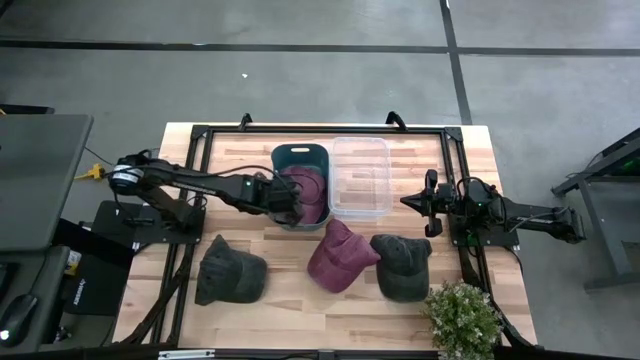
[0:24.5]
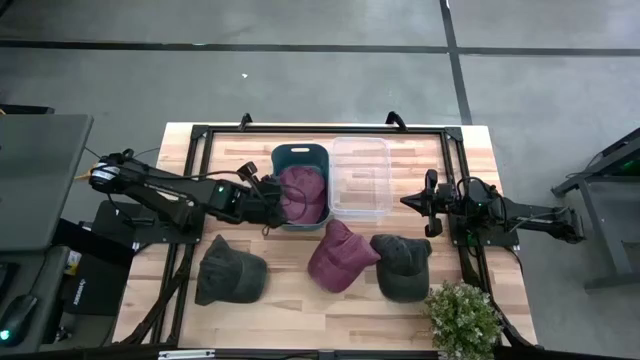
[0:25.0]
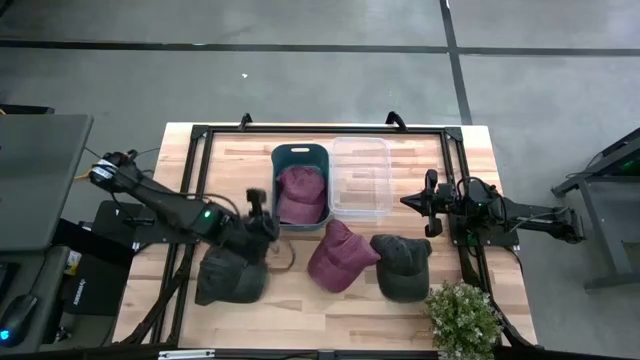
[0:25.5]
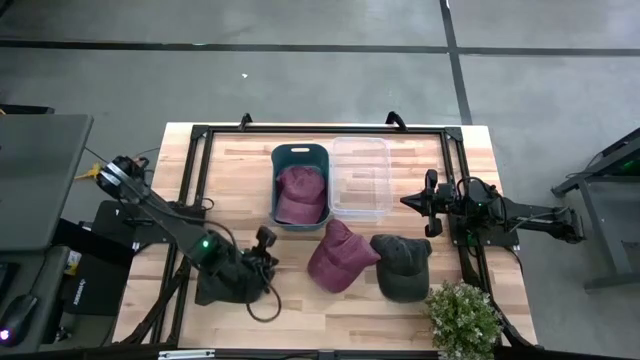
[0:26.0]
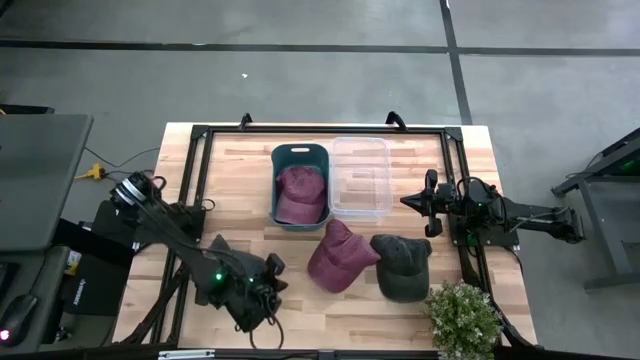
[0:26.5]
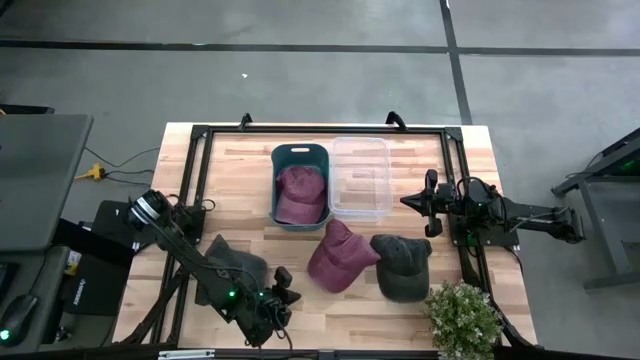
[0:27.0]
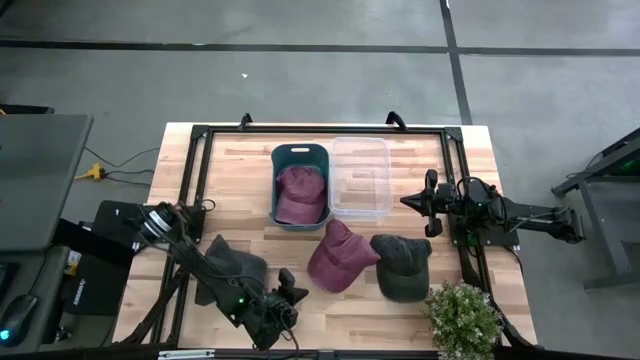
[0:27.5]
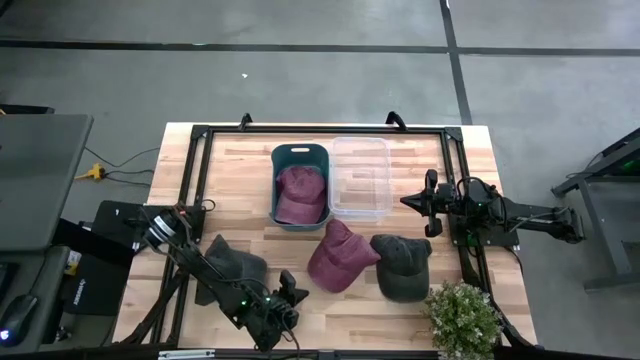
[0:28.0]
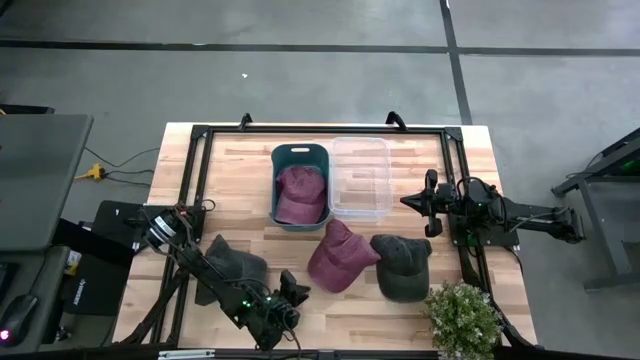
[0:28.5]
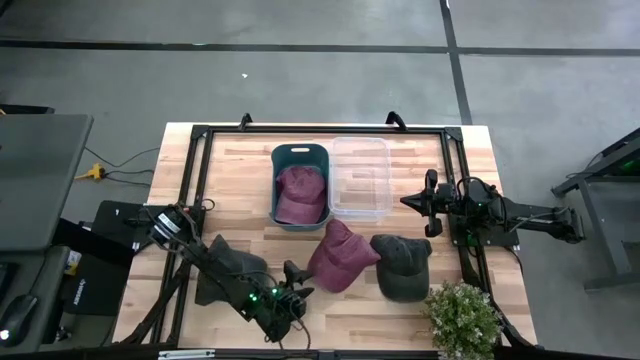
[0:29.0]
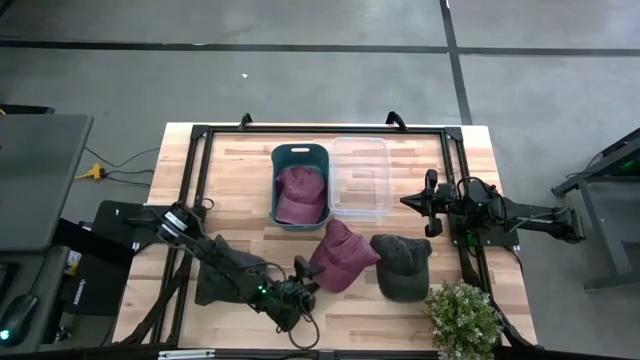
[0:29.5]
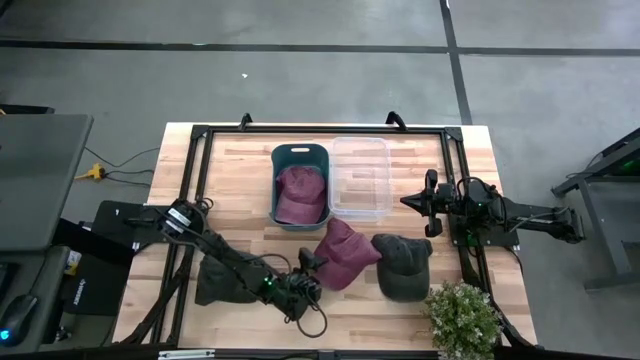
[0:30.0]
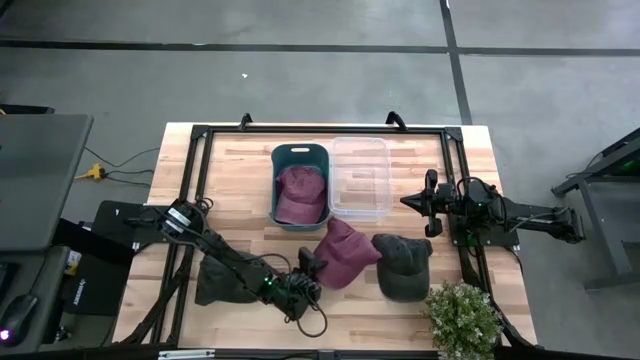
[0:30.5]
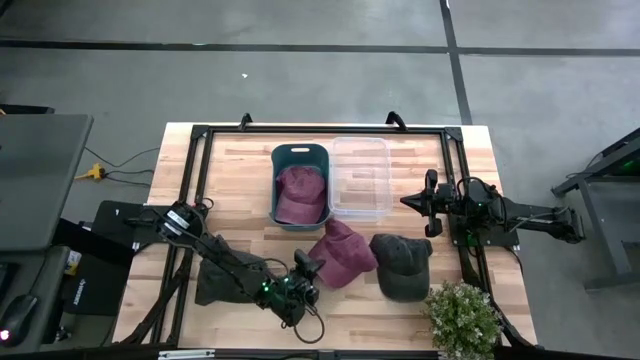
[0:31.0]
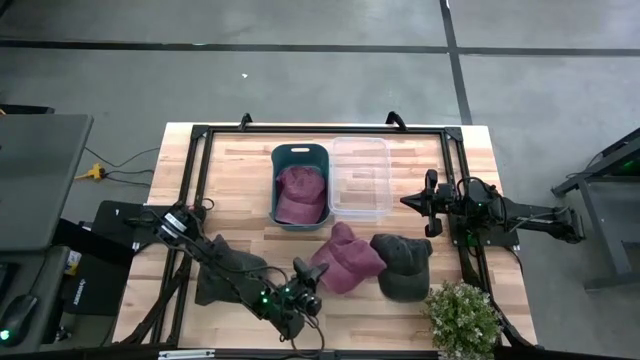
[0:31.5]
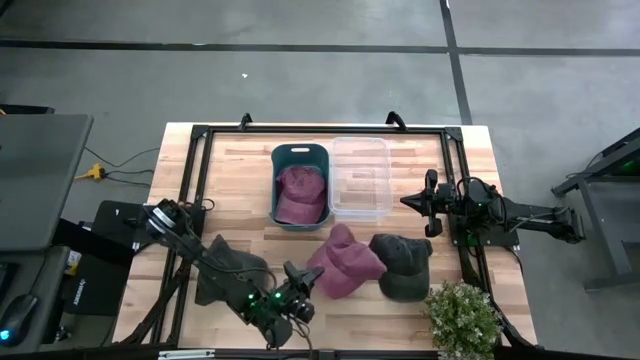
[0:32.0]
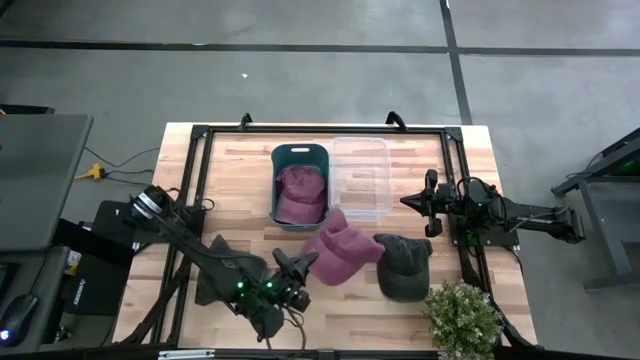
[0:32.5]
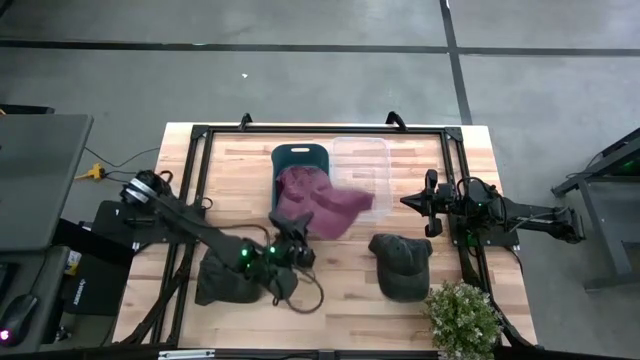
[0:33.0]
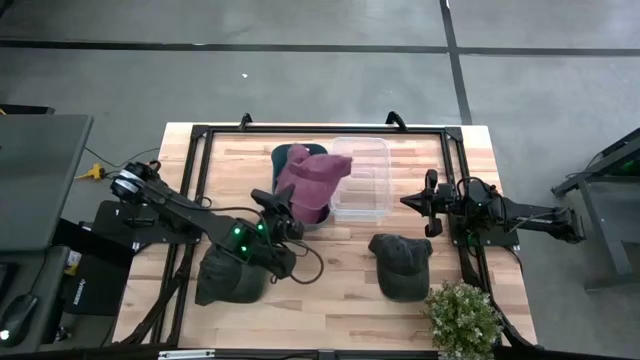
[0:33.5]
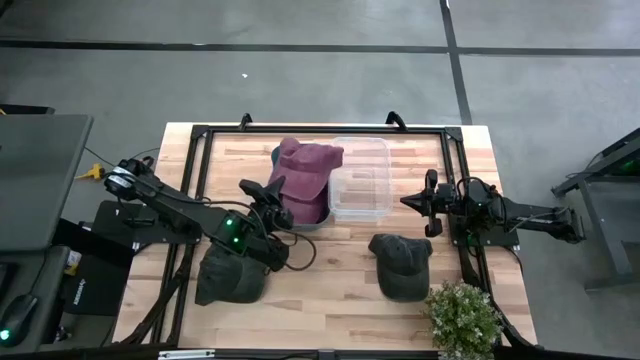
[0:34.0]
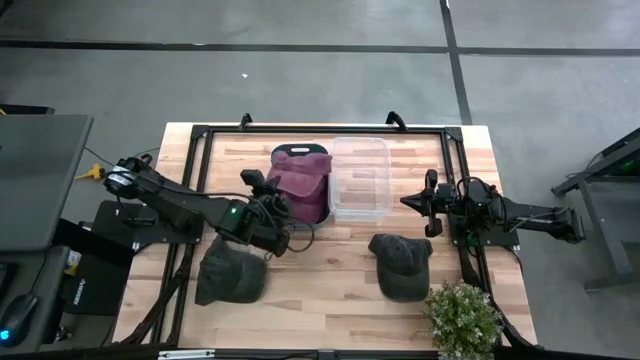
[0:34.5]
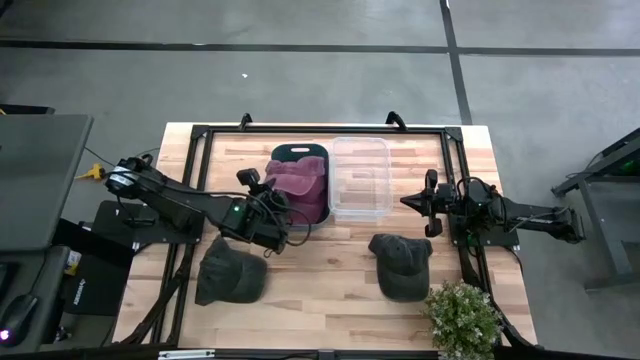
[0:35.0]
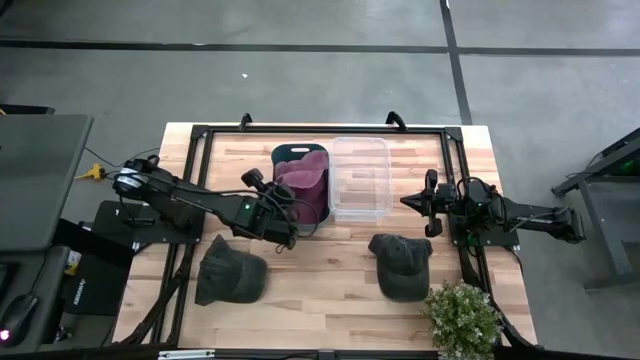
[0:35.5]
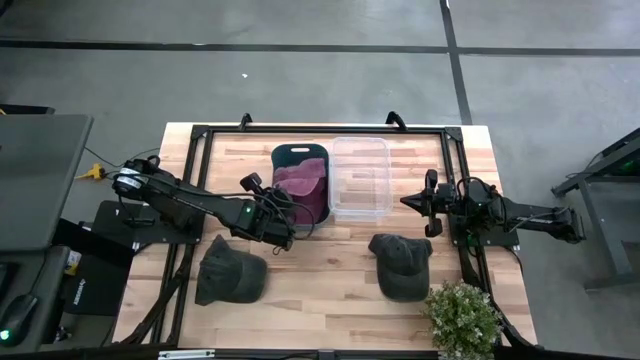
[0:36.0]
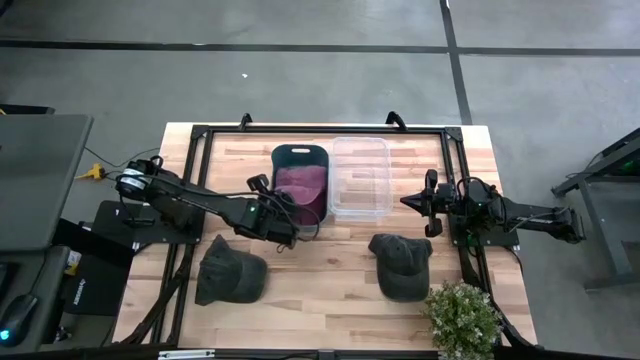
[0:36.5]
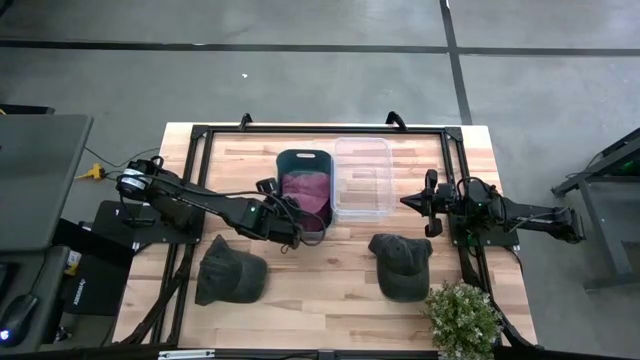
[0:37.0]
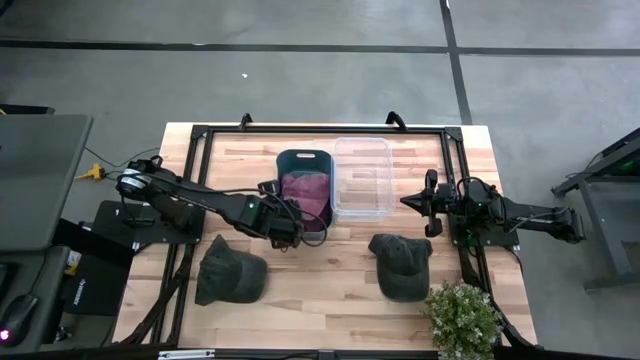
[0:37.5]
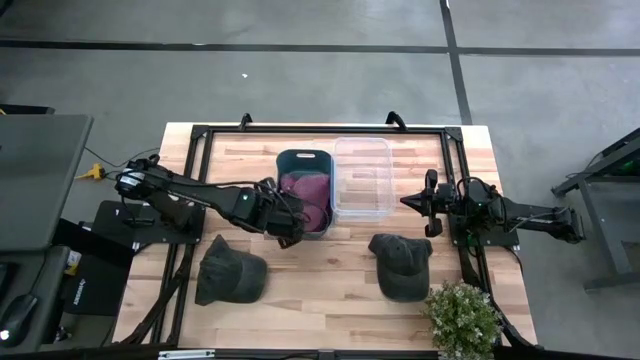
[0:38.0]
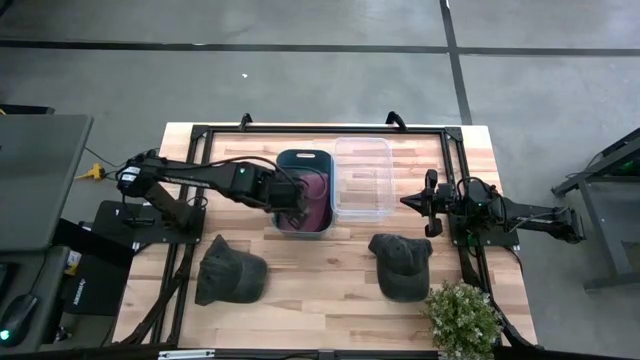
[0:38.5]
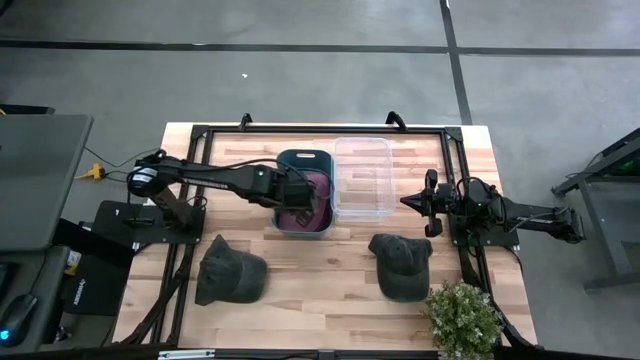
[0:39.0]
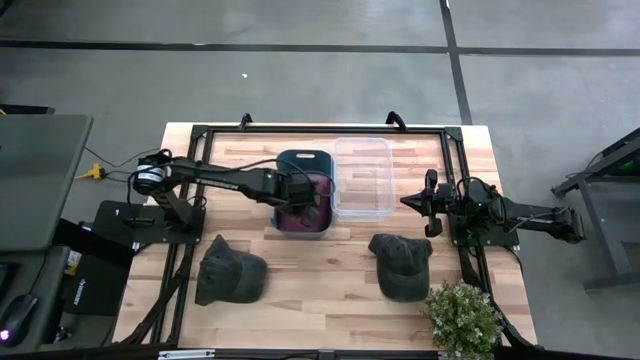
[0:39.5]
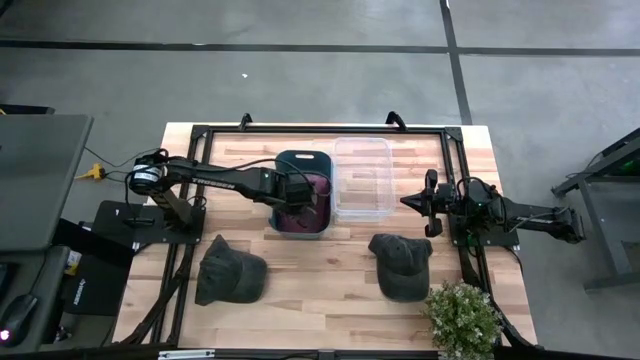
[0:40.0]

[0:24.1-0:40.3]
Task: Pick & Place hat
Put the red cap into the blue bin

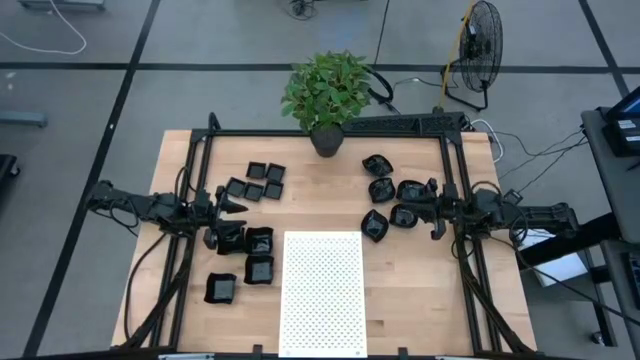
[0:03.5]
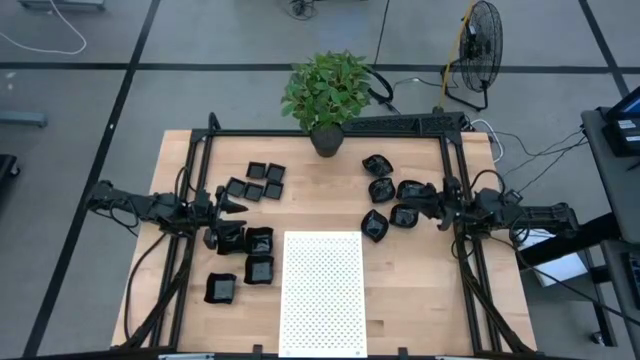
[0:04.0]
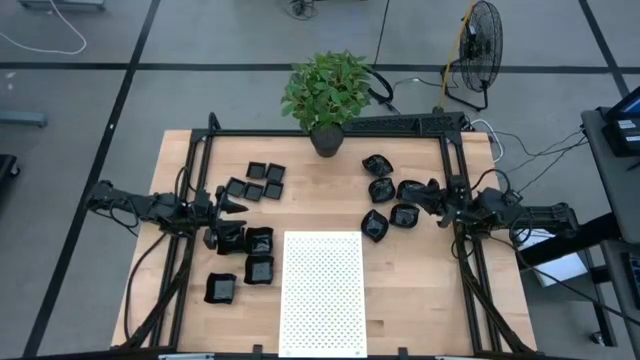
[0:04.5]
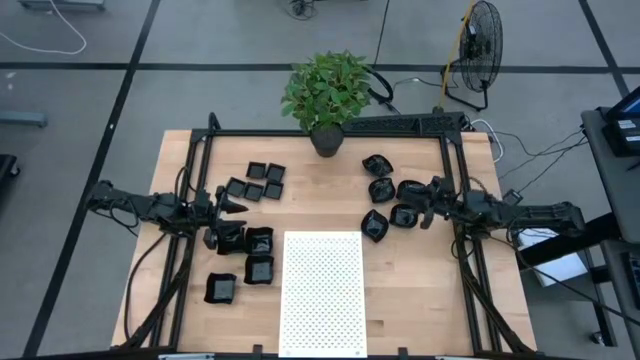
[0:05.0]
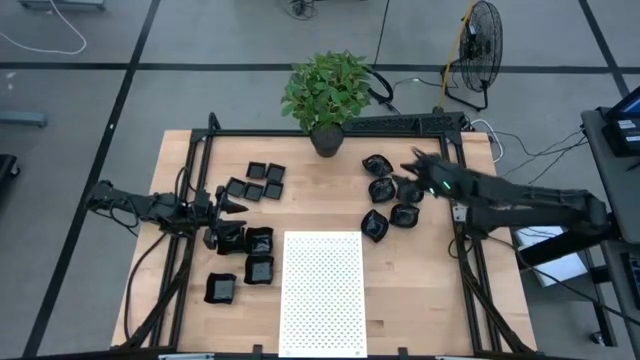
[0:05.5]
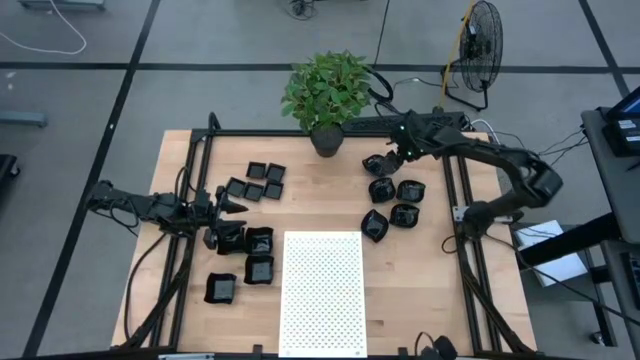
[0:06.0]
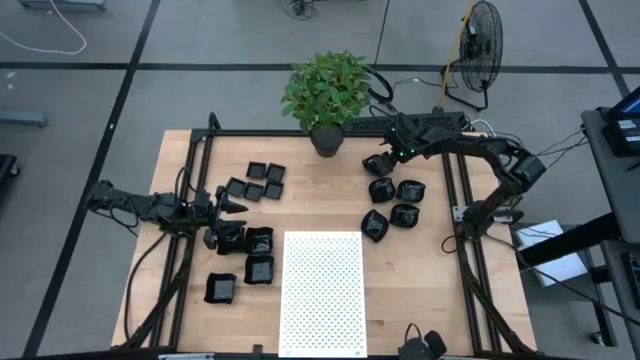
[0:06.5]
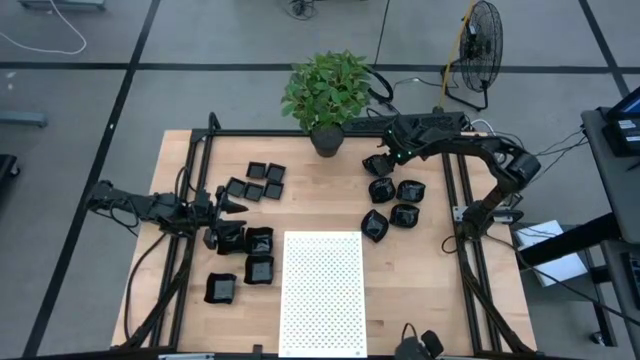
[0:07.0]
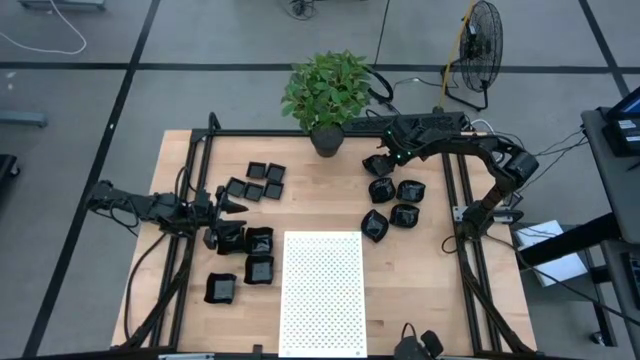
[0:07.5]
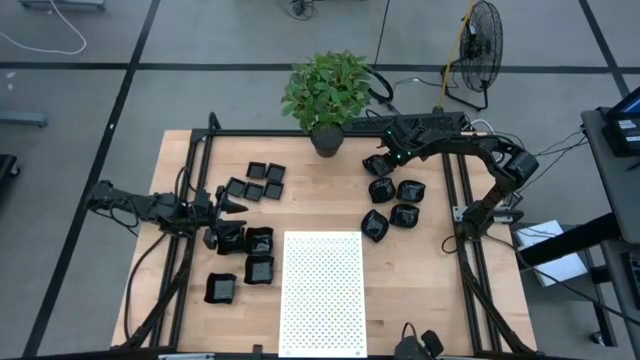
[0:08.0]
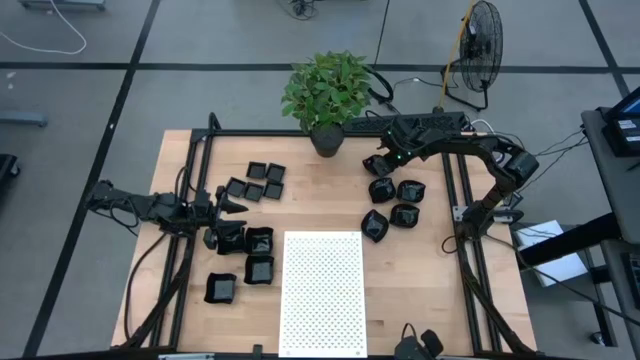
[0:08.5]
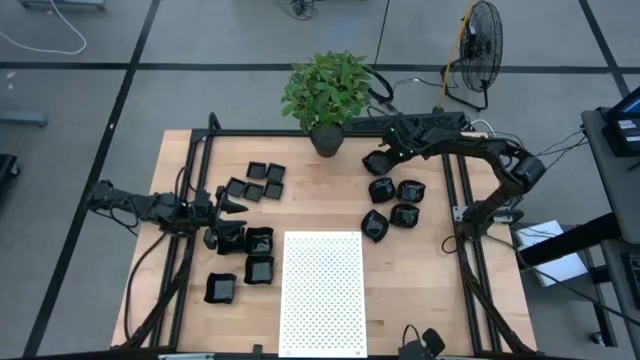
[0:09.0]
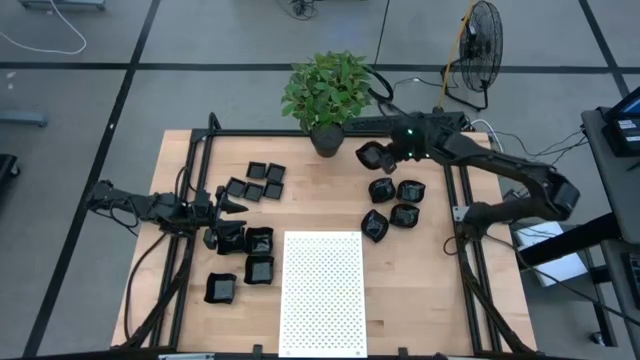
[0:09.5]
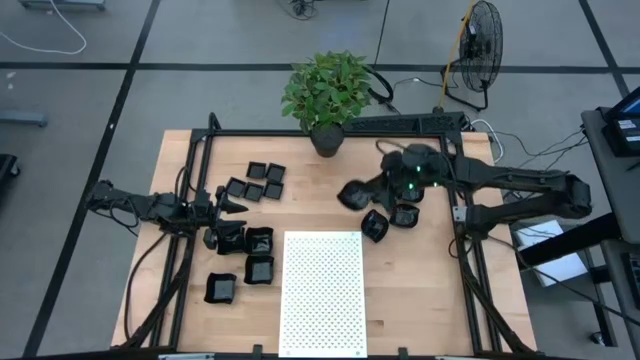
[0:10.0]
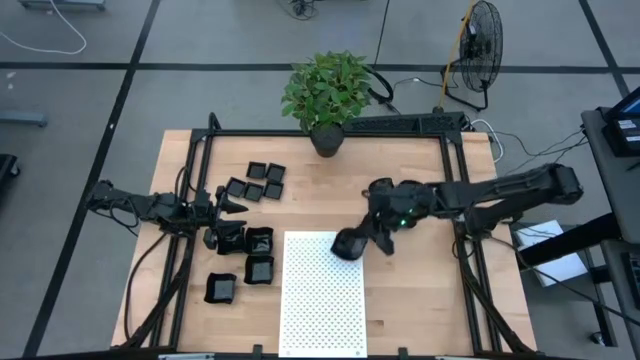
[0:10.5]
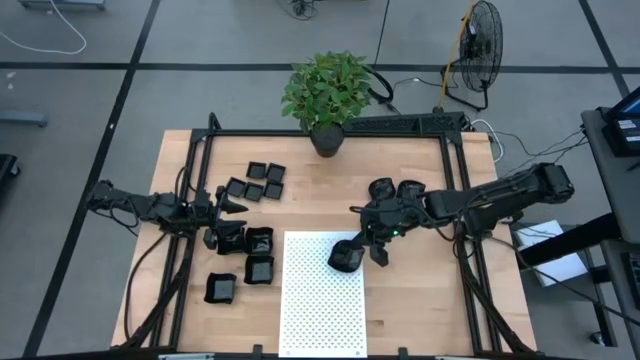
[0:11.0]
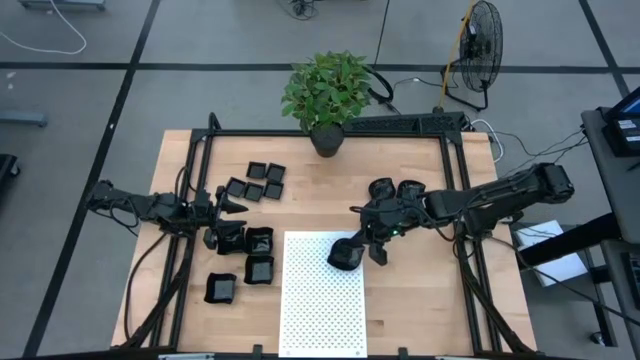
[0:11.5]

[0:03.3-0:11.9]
Task: Pick & Place Mini shaped plates
Put the leaf shaped plate on the shelf
